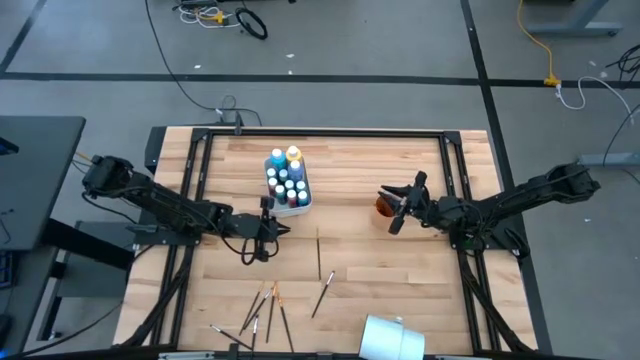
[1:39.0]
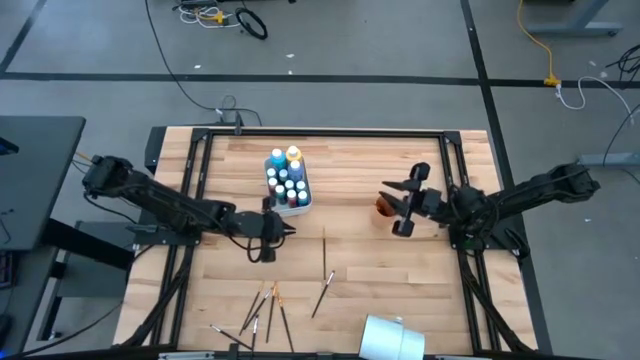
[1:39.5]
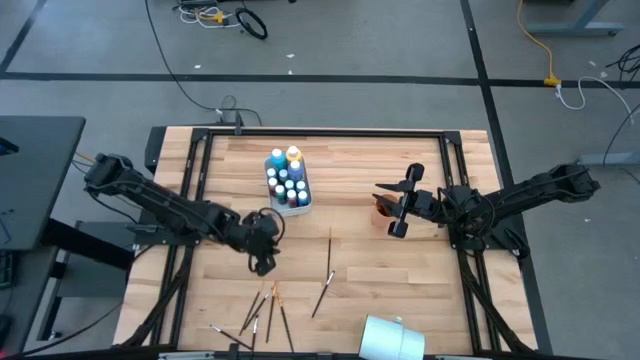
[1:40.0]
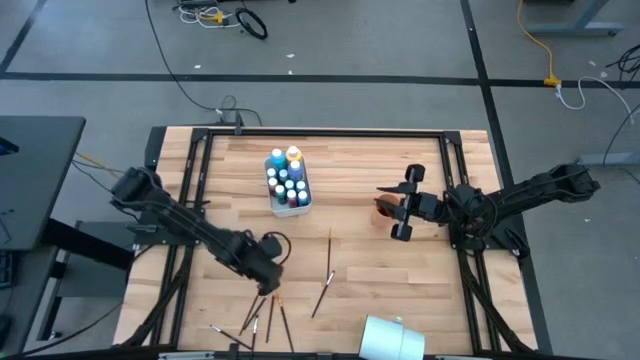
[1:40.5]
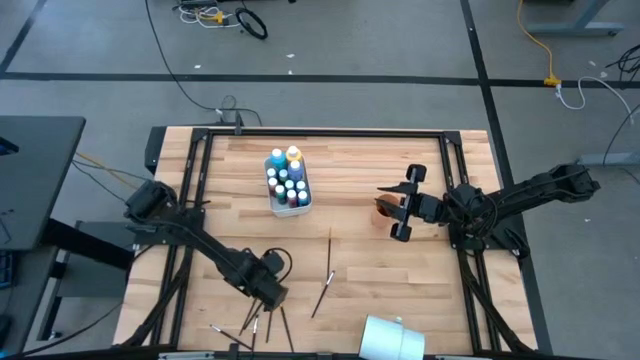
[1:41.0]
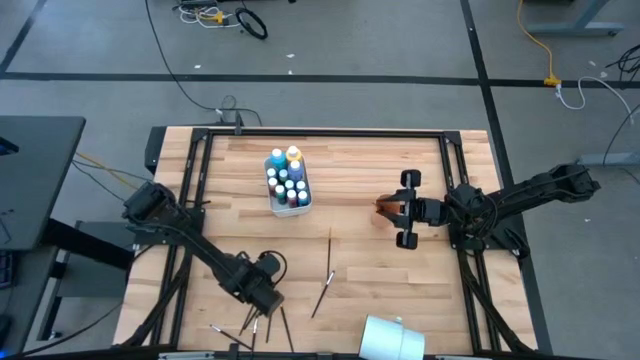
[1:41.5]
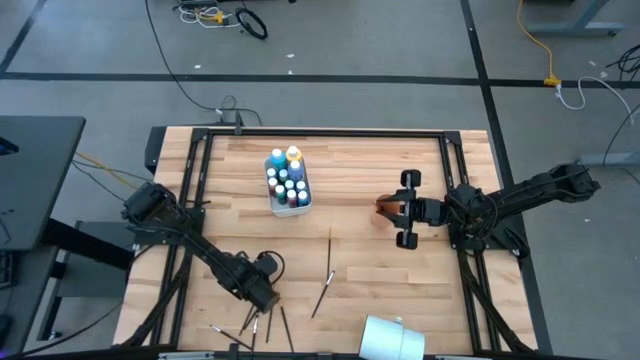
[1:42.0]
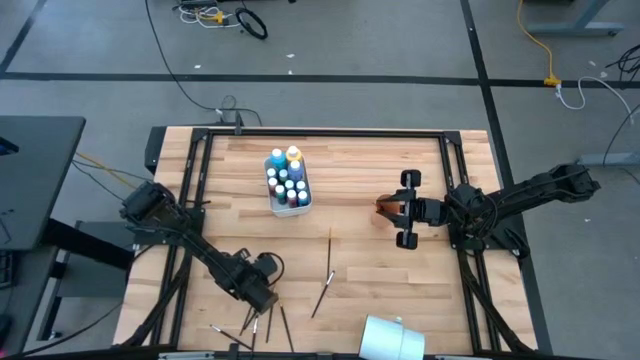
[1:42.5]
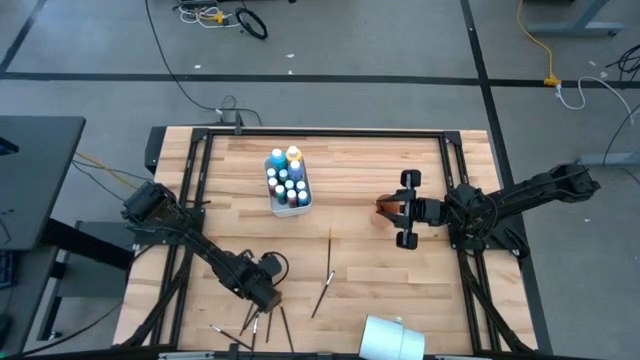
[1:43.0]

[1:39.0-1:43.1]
Task: Pick & Place Paint Supplies
Put the gold paint brush into the orange cup

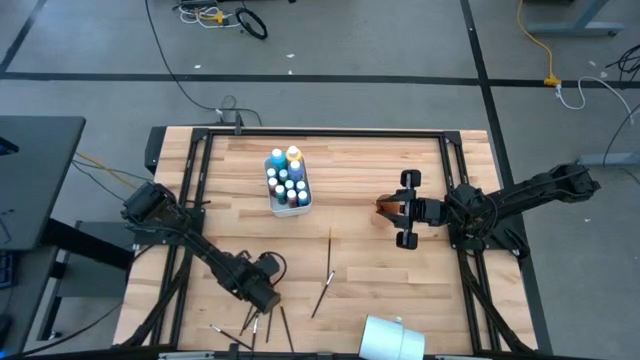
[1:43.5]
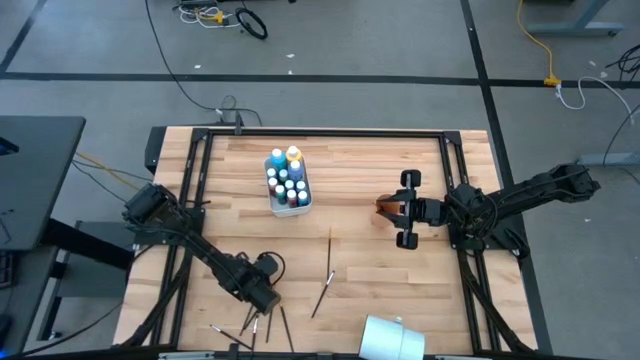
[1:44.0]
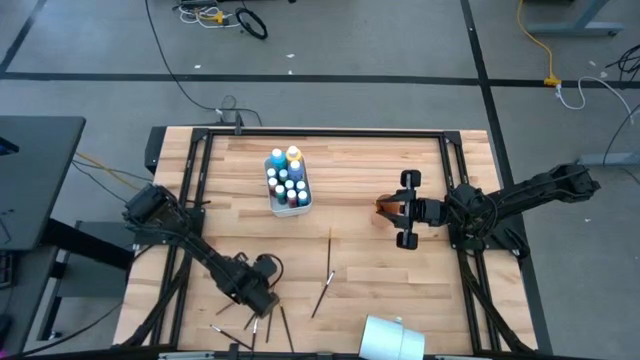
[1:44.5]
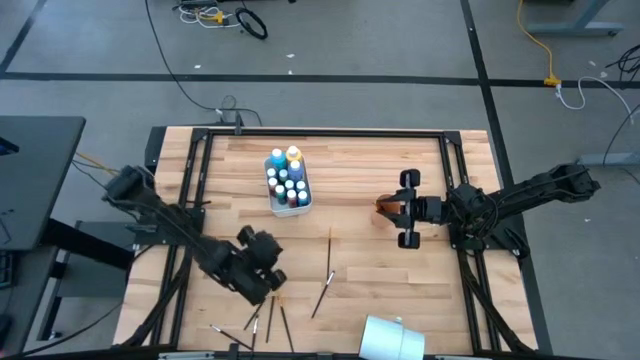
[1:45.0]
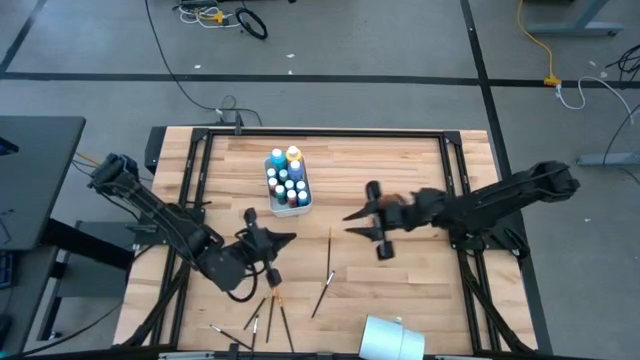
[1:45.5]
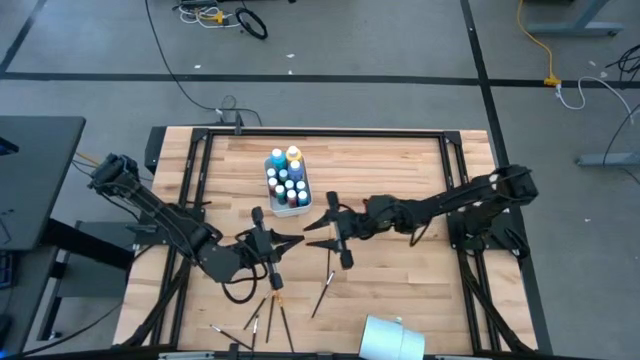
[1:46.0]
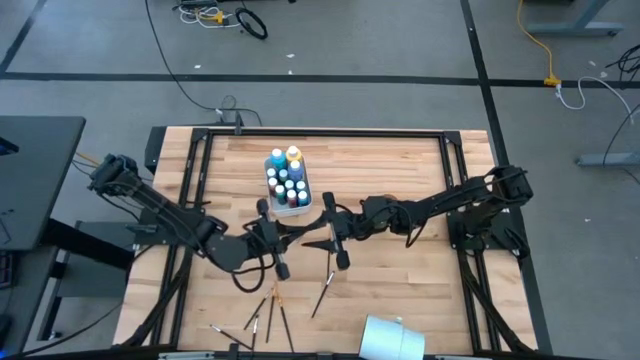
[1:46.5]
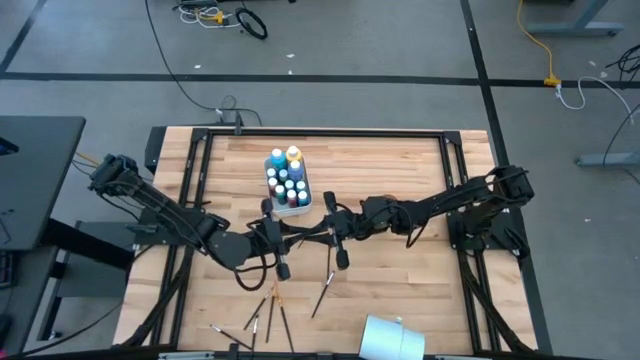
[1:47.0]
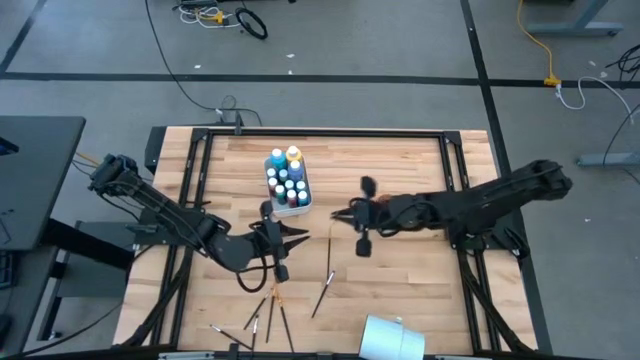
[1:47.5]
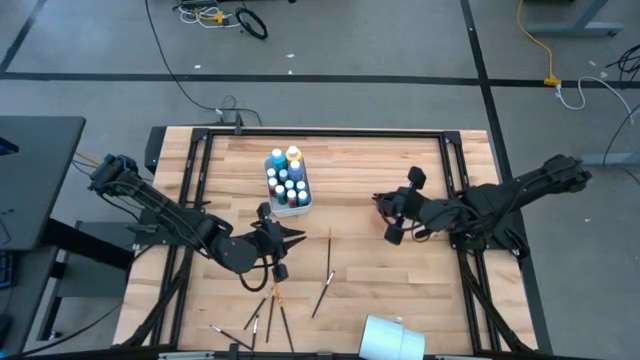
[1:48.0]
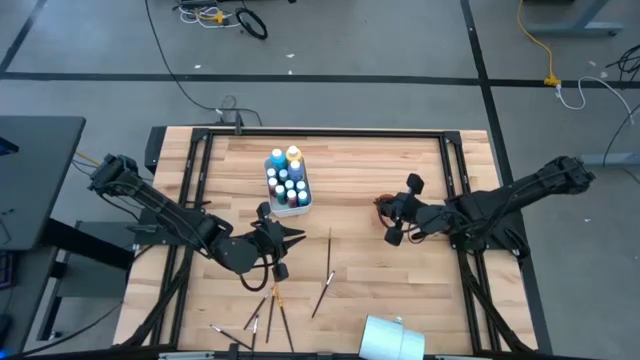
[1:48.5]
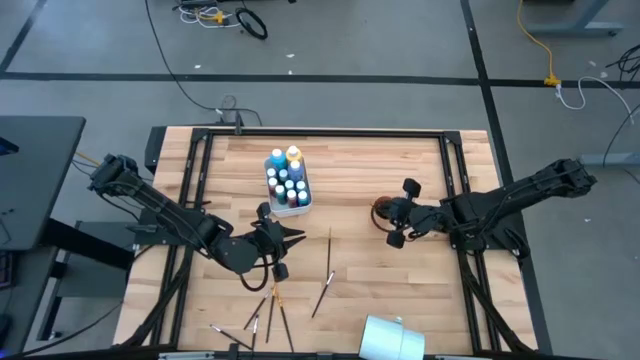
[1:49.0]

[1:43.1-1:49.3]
Put the gold paint brush into the orange cup

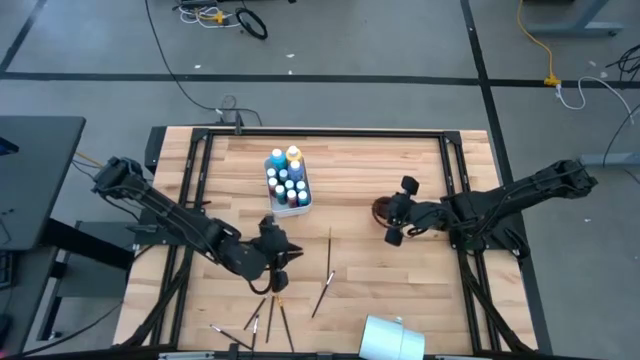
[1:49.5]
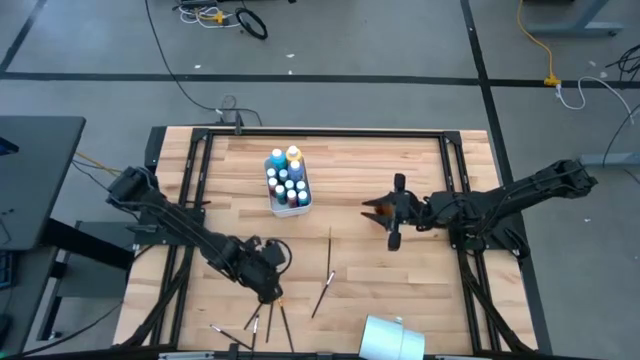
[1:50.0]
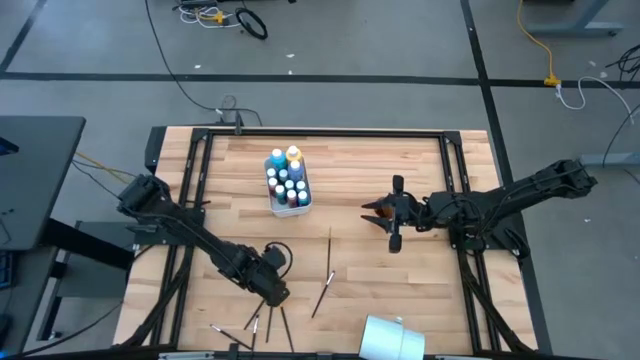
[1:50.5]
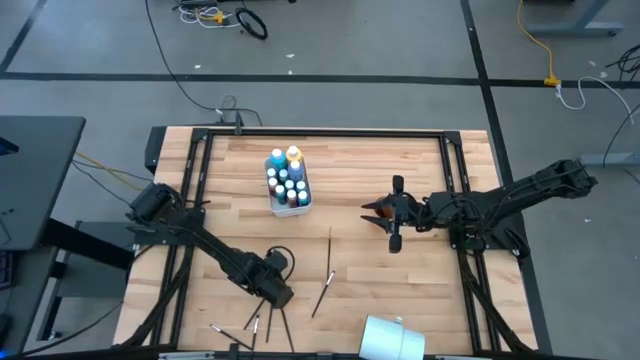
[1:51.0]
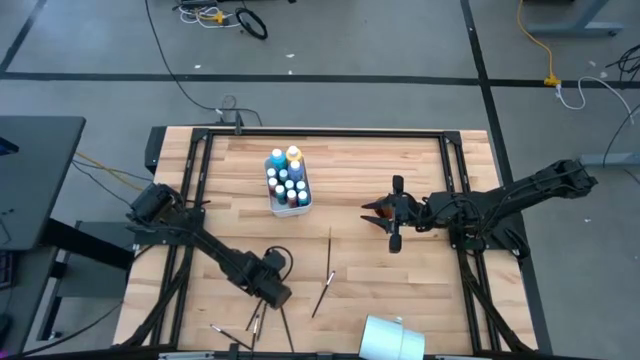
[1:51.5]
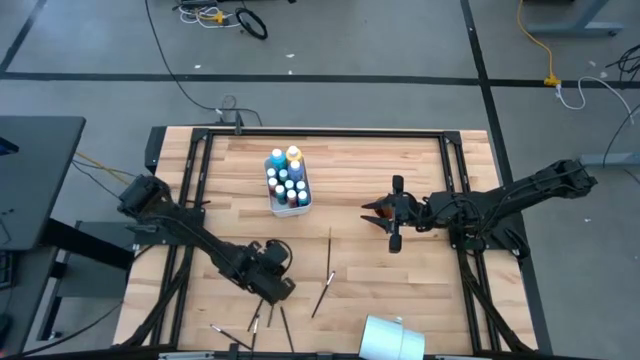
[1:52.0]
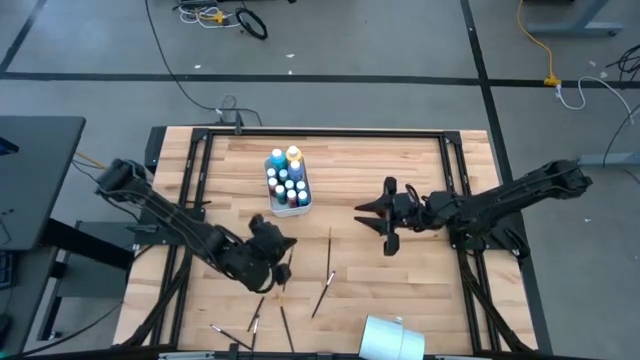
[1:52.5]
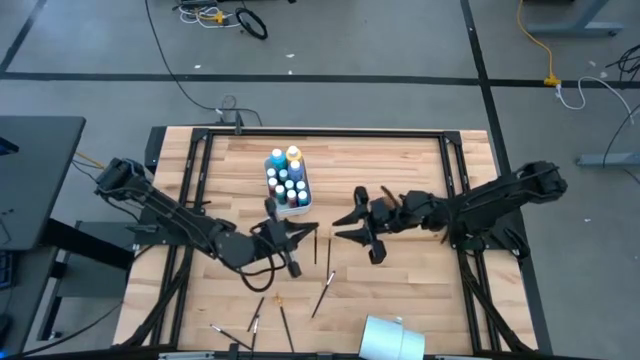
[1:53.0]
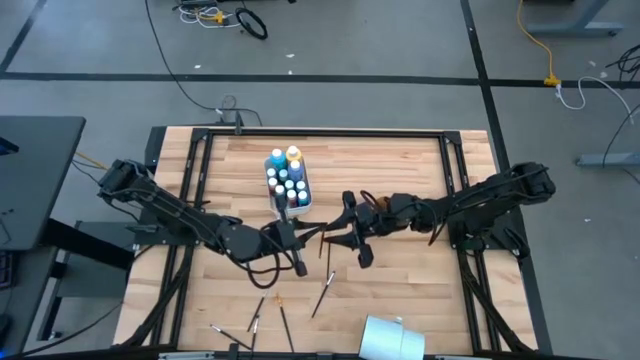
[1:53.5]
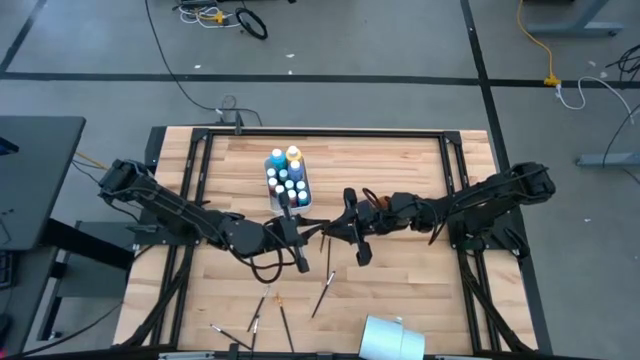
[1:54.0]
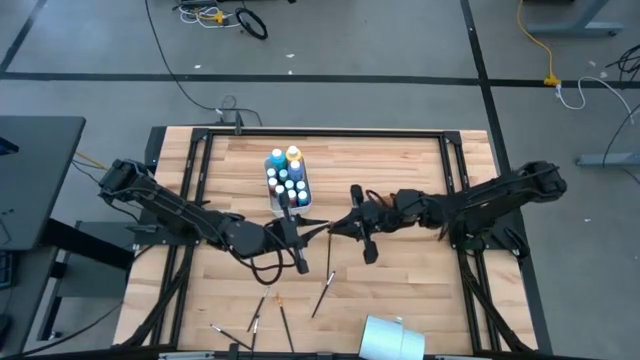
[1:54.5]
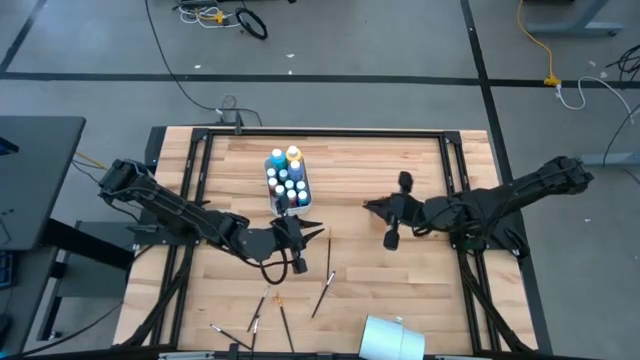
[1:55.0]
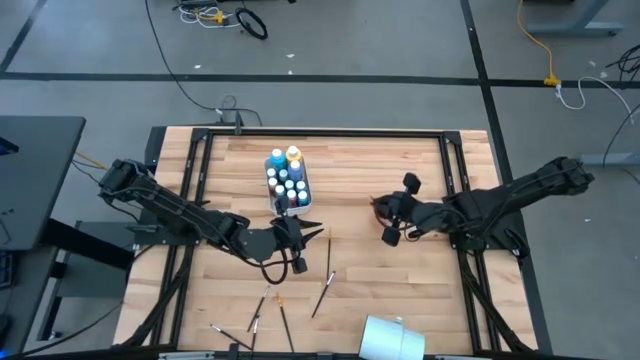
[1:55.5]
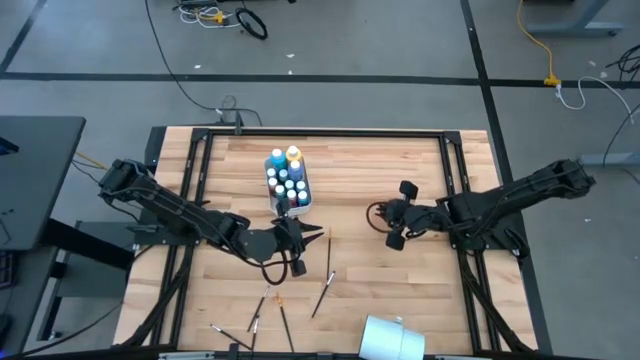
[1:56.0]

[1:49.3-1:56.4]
Put the gold paint brush into the orange cup

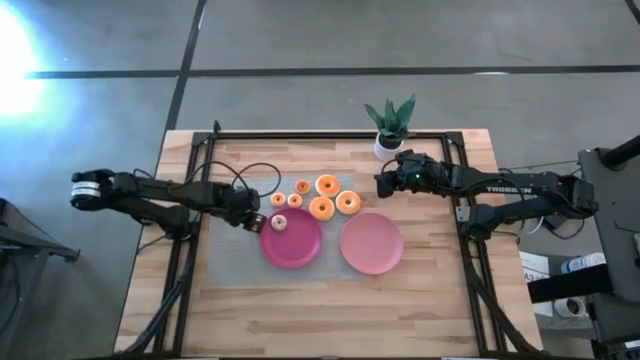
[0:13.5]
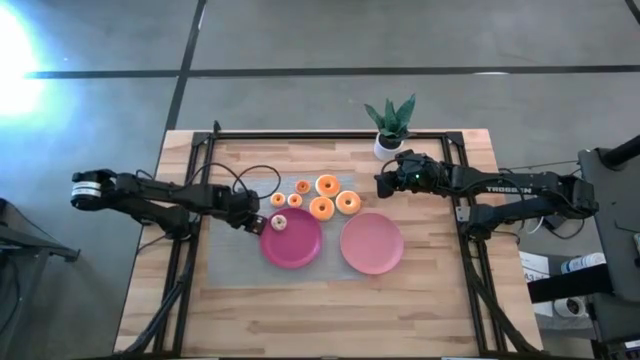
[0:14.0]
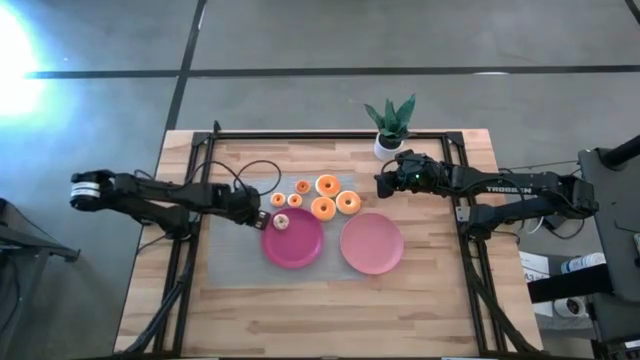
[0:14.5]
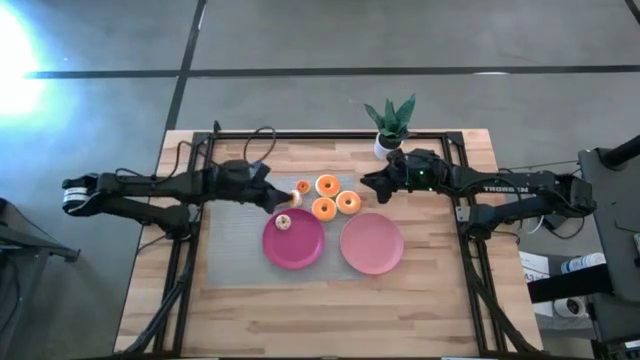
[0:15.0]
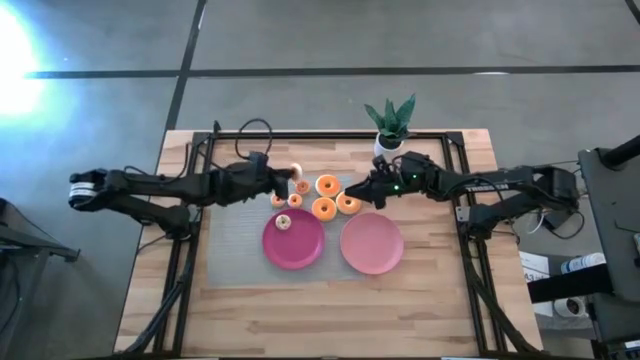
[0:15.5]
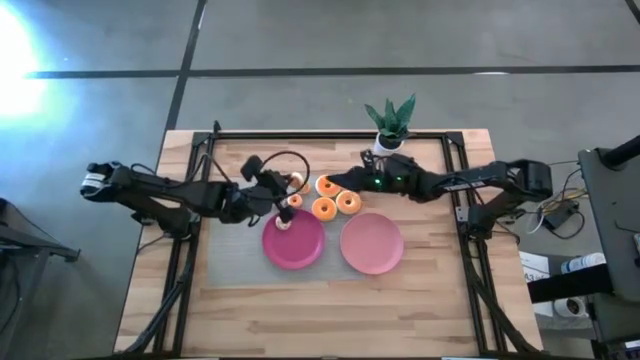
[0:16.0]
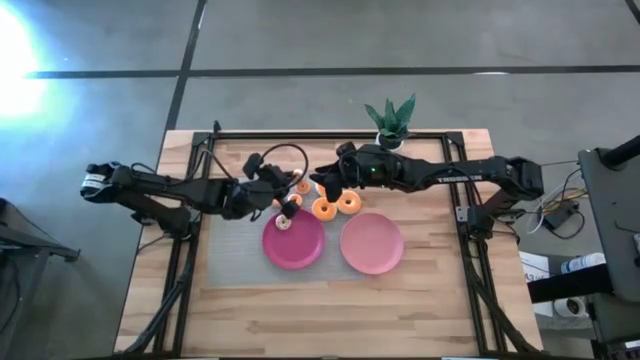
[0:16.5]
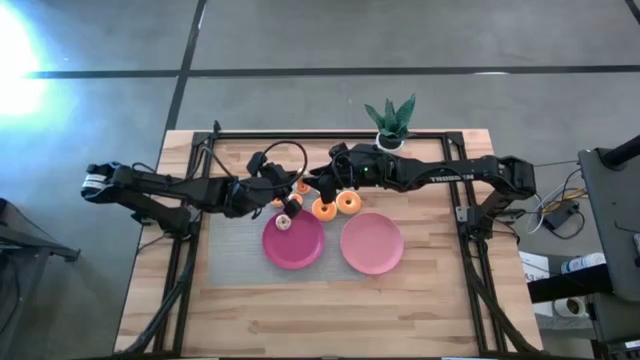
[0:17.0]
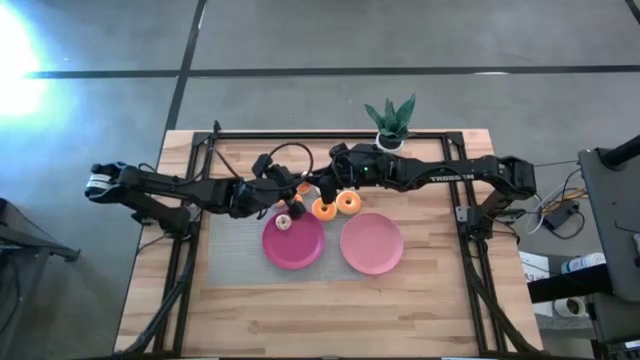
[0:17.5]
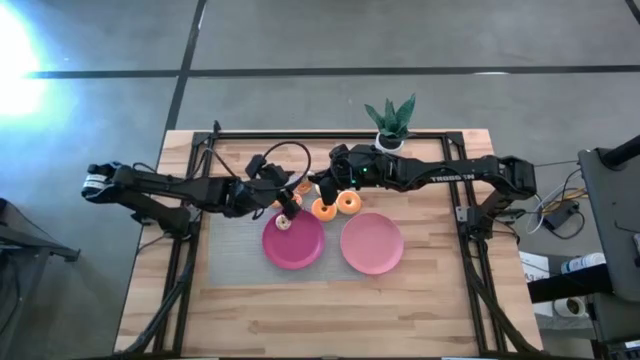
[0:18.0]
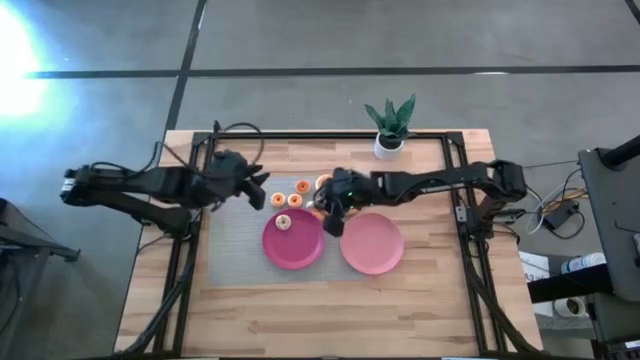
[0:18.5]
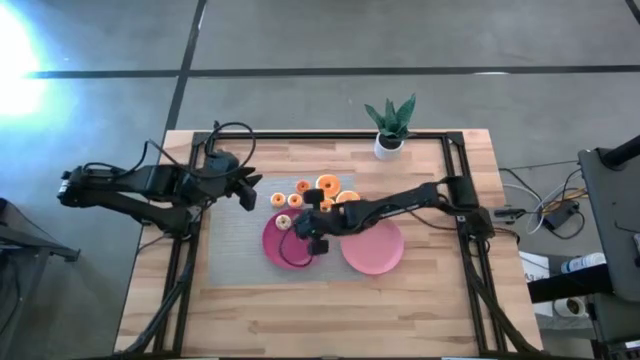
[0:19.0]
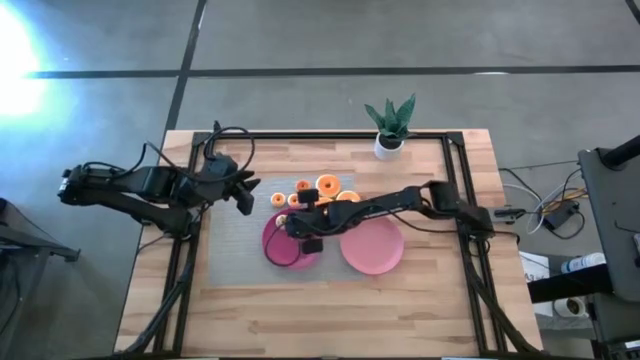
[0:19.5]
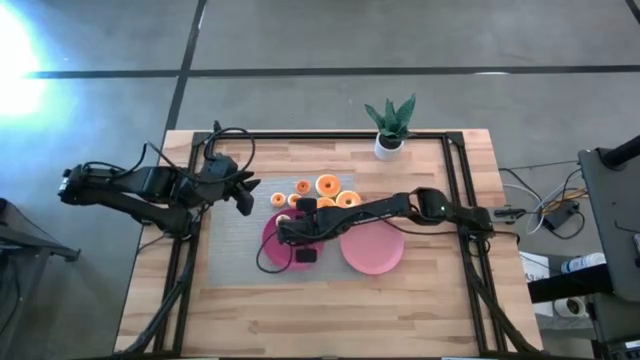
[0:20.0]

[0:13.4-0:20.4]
Task: Pick & Place donuts
Put the small blue donut on the dark pink plate
